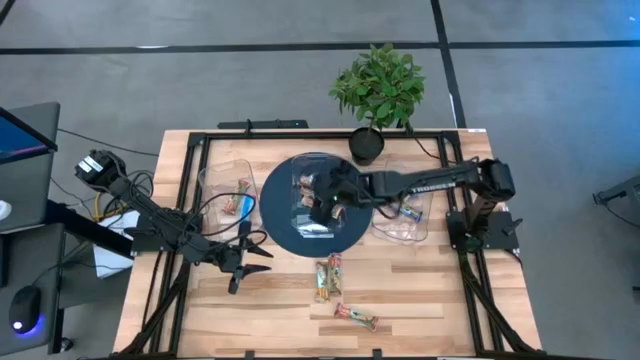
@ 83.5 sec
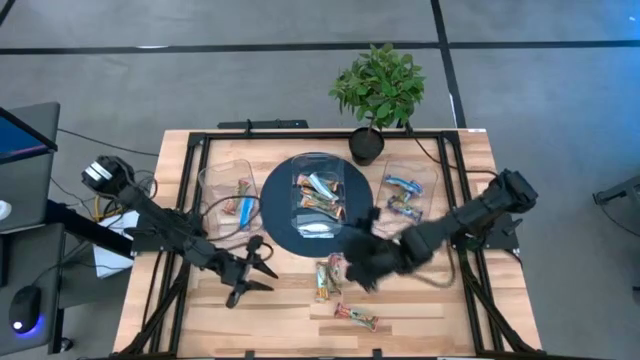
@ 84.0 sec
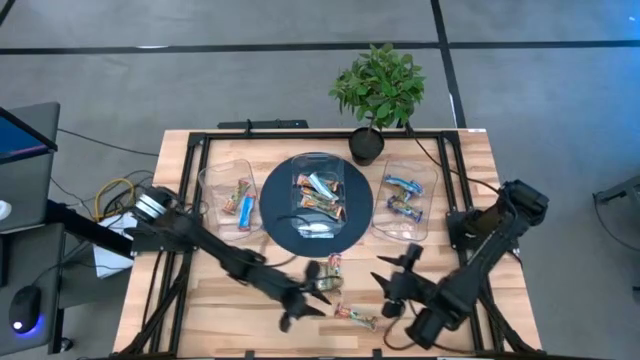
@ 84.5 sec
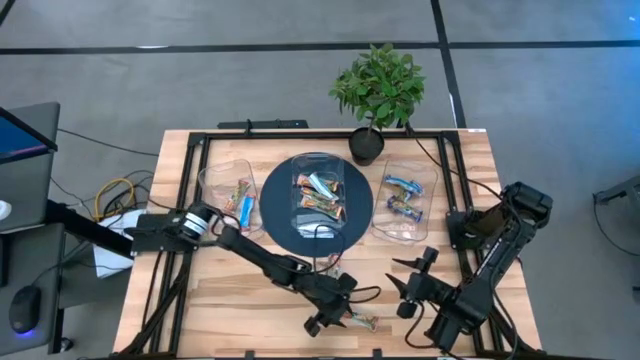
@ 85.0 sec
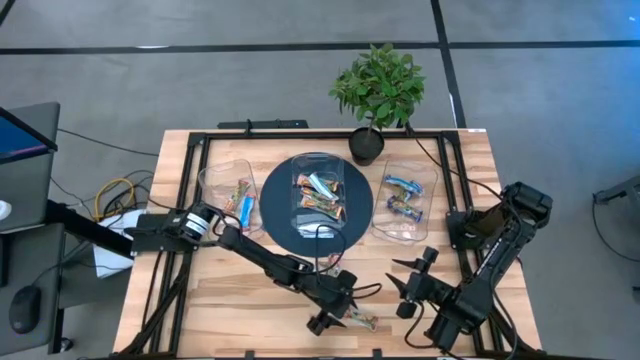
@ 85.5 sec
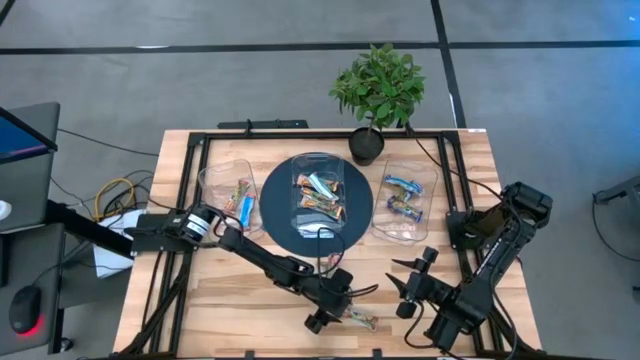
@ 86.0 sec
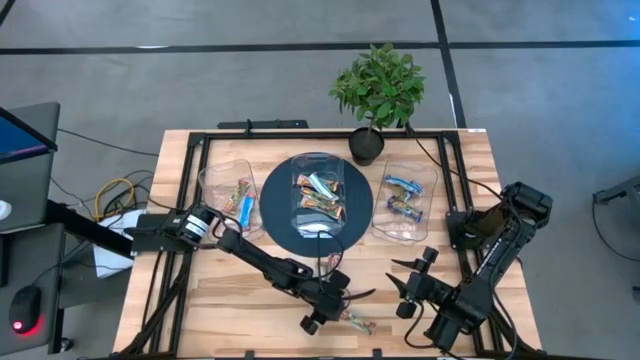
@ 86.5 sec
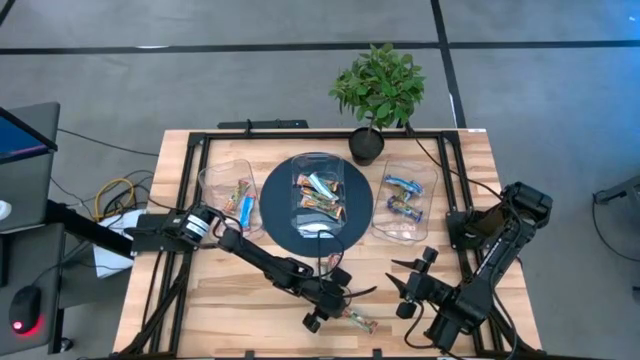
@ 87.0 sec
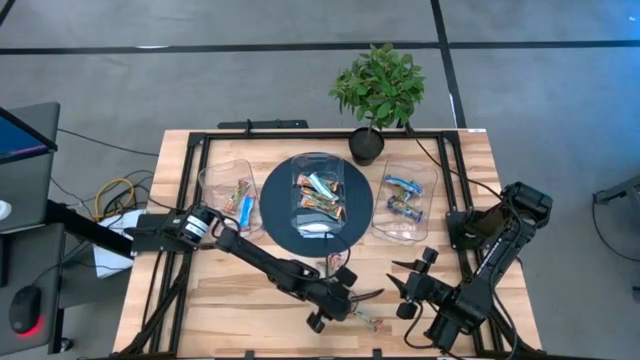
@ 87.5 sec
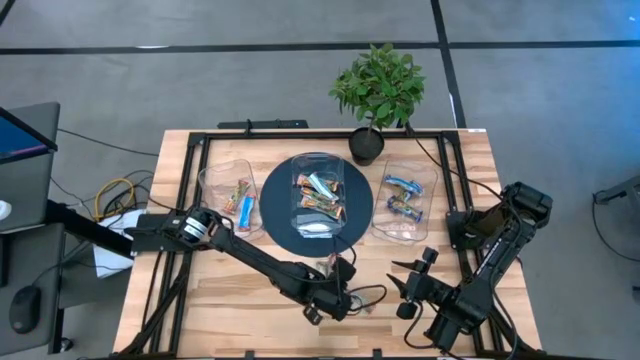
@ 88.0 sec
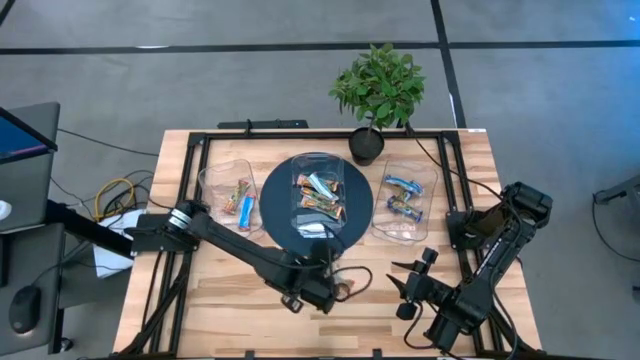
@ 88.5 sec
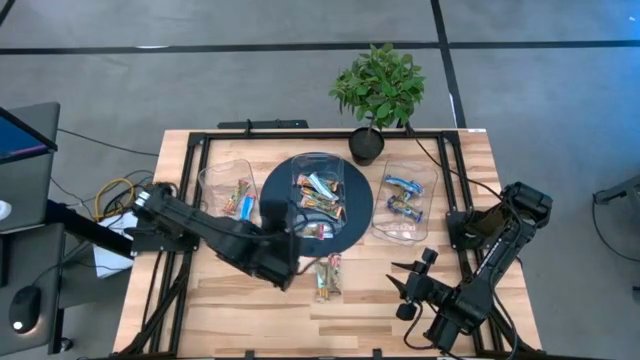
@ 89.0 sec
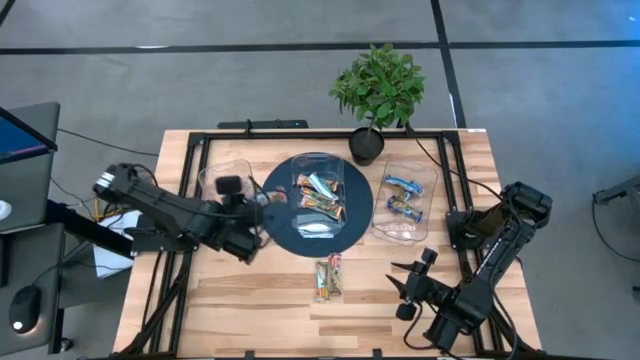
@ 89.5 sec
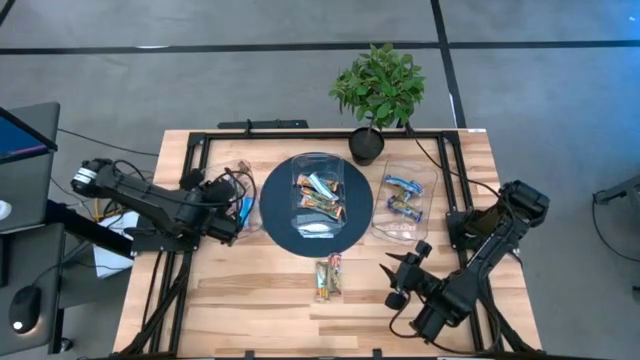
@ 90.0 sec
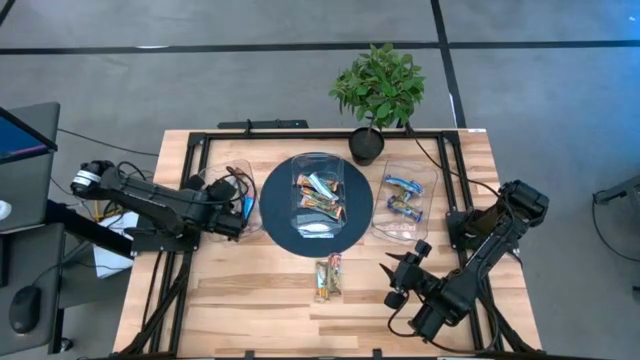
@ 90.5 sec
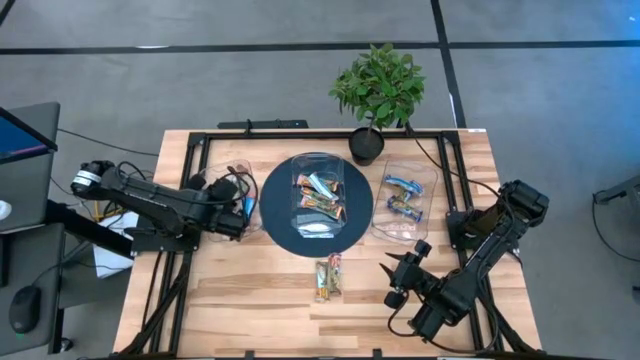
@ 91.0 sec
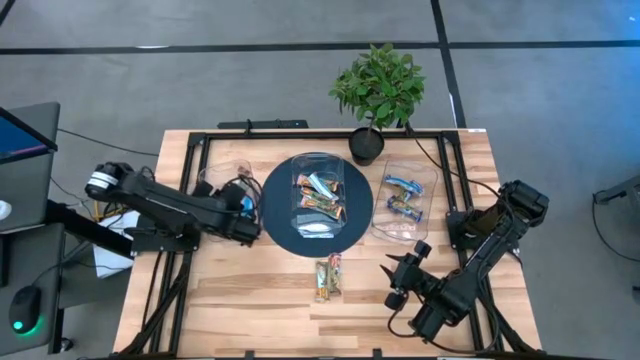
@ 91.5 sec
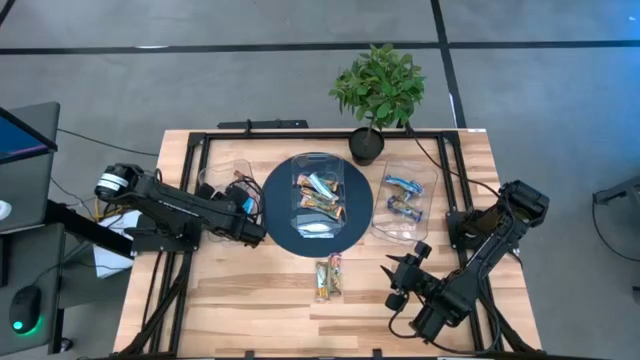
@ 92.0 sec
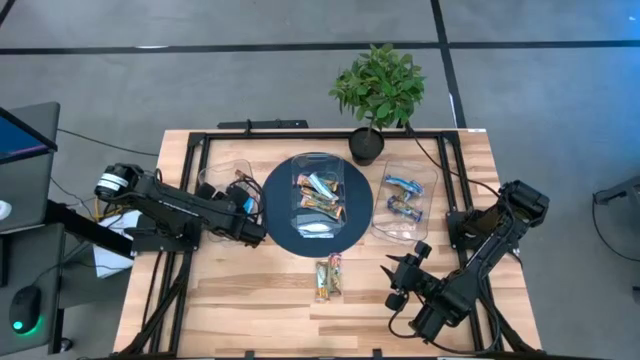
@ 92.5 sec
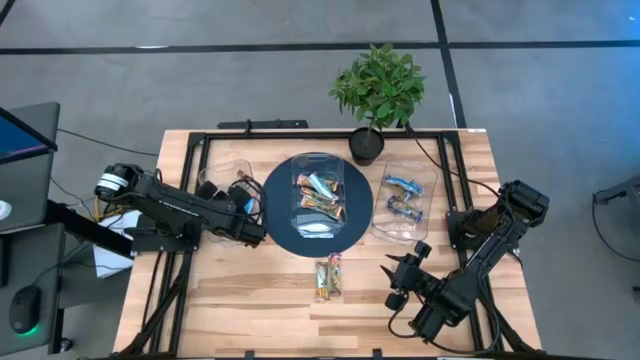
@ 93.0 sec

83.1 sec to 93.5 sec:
Task: Pick and place Granola Bars by type
Put the red granola bar into the left transparent bin

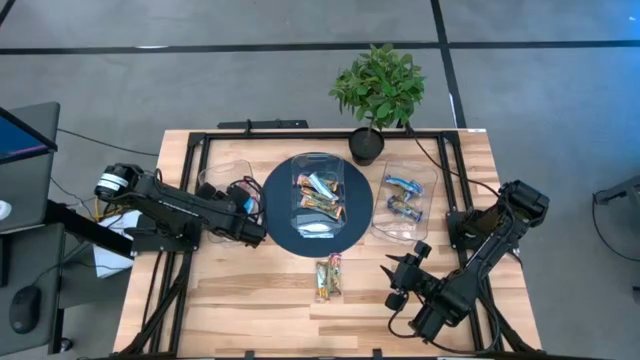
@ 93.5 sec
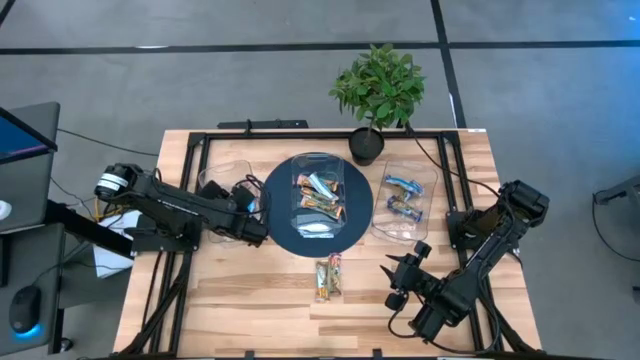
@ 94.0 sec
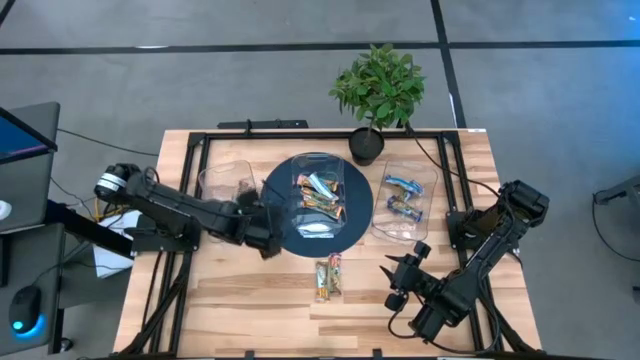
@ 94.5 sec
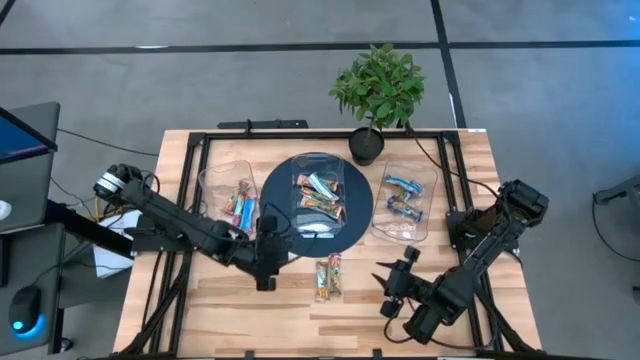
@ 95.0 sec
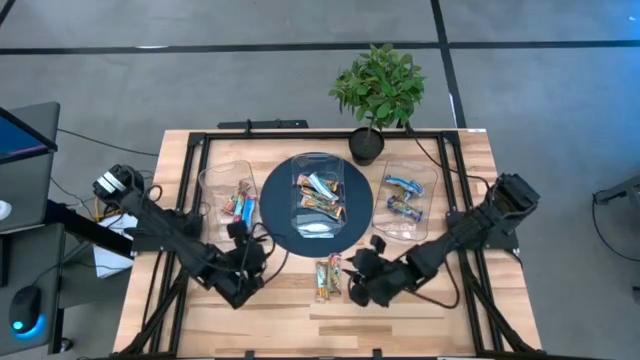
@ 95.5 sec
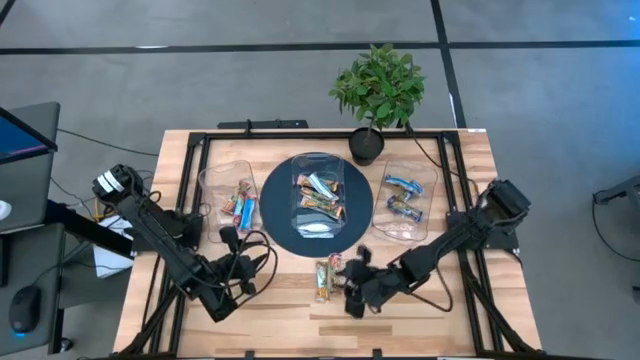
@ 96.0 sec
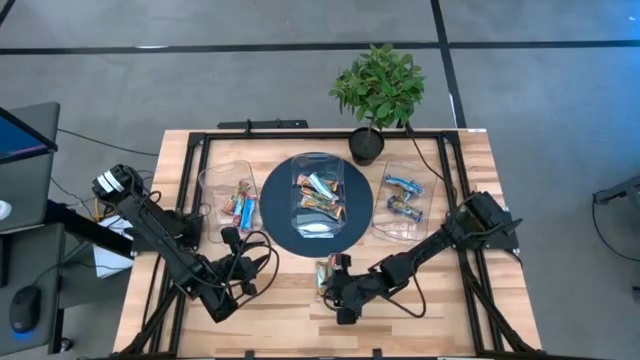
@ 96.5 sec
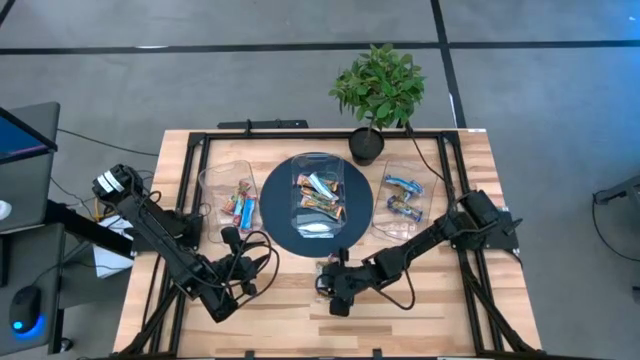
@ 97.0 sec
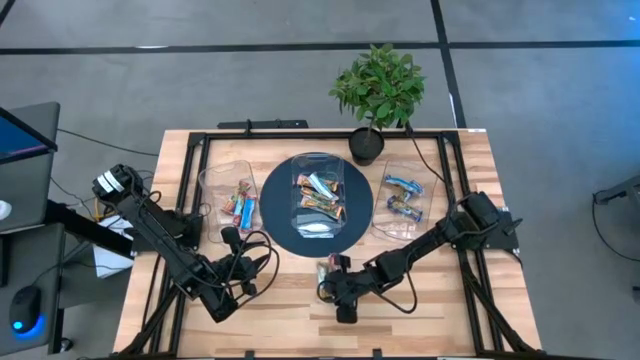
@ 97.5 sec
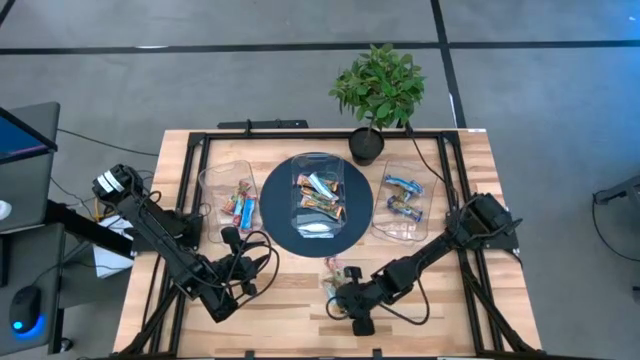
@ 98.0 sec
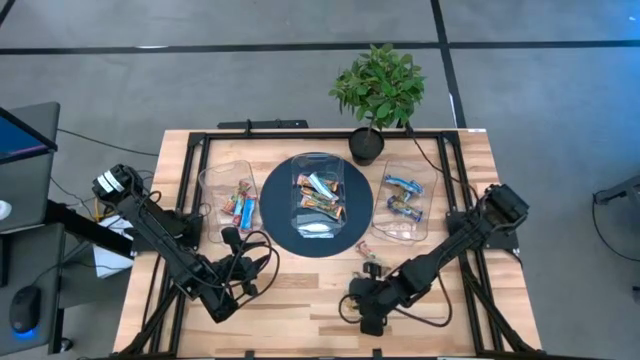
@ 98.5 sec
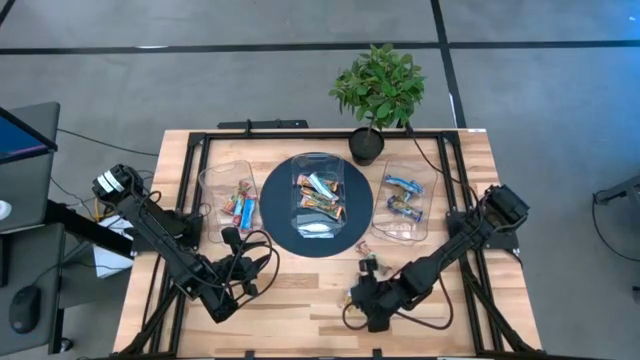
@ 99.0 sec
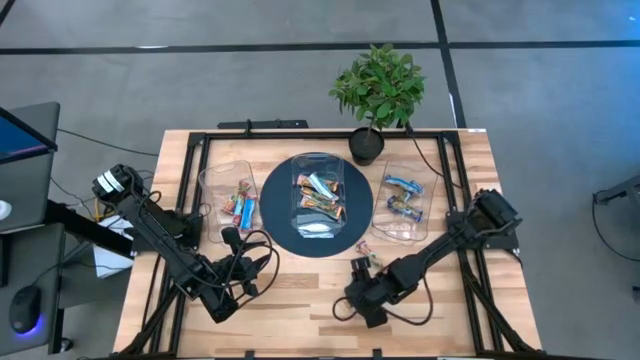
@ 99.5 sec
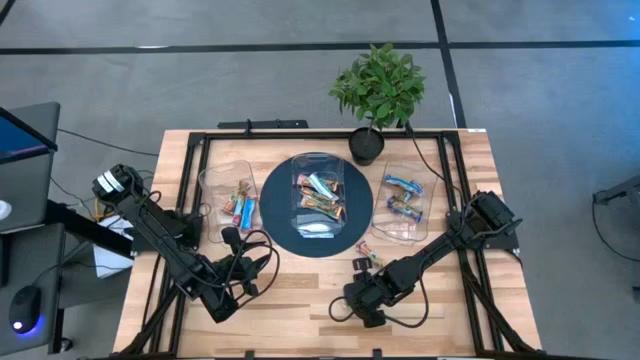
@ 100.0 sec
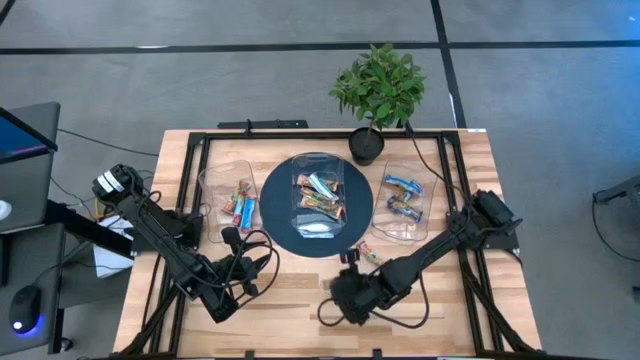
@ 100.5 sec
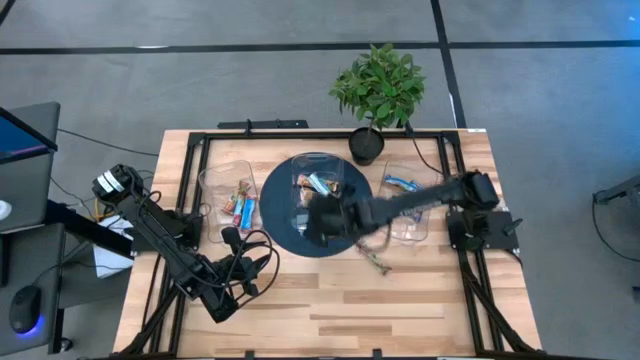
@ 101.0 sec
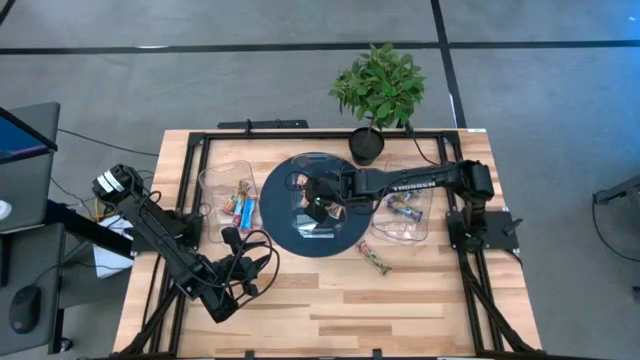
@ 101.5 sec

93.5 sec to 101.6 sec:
Put the yellow granola bar into the middle transparent bin

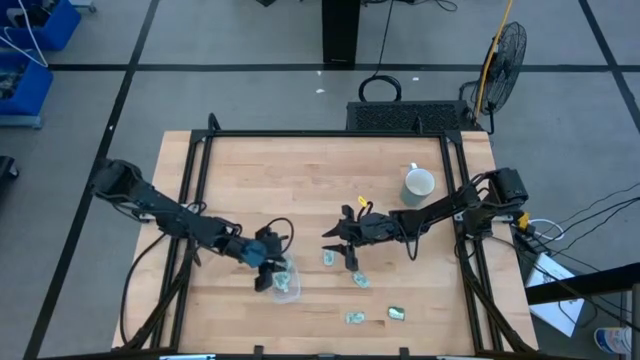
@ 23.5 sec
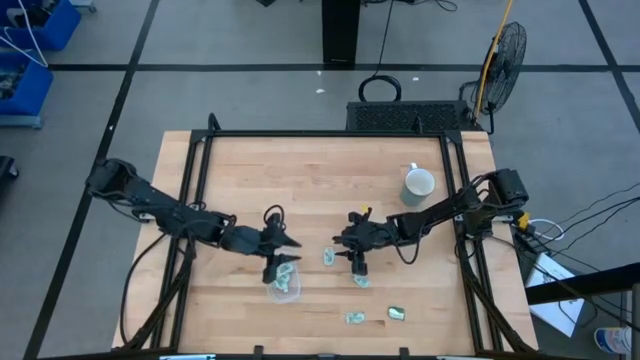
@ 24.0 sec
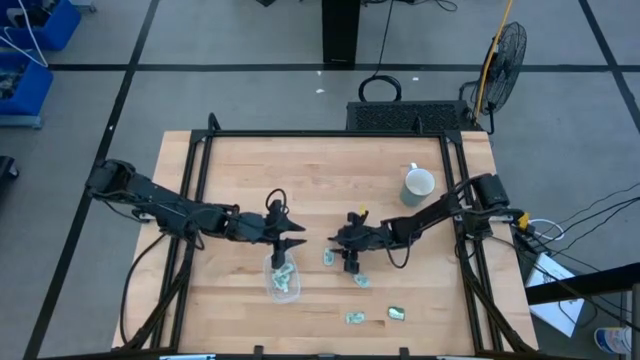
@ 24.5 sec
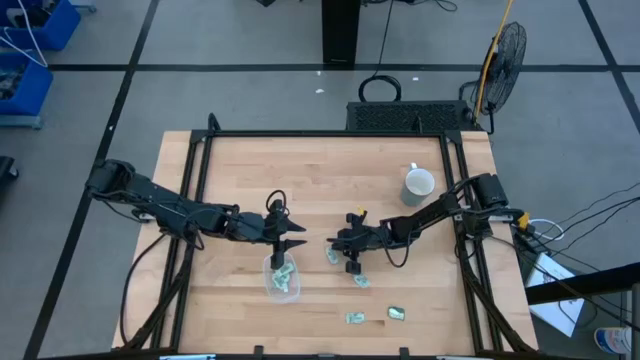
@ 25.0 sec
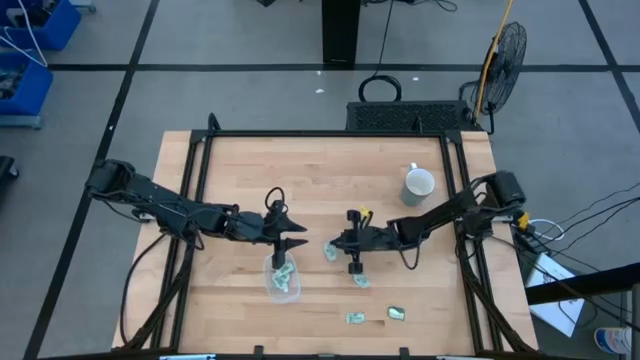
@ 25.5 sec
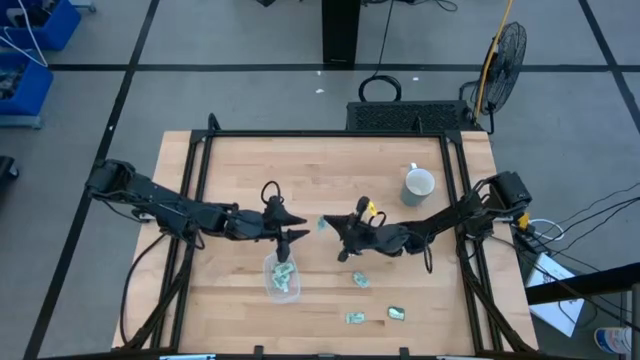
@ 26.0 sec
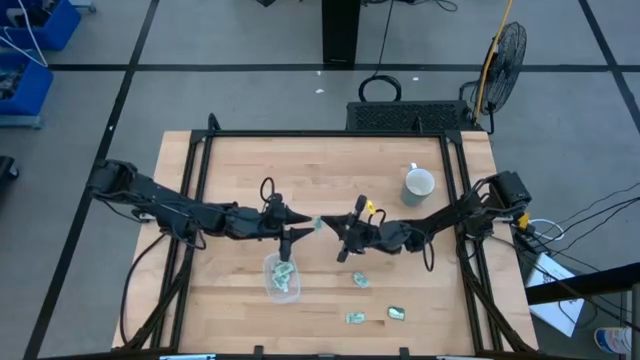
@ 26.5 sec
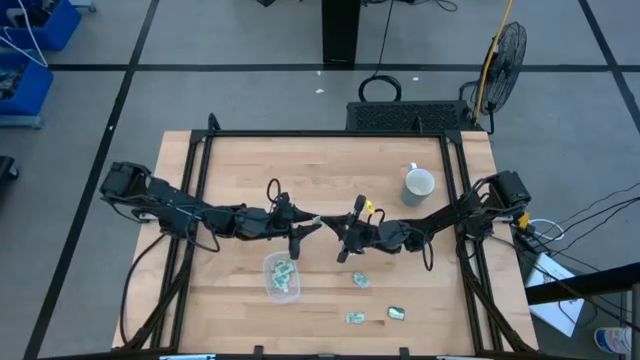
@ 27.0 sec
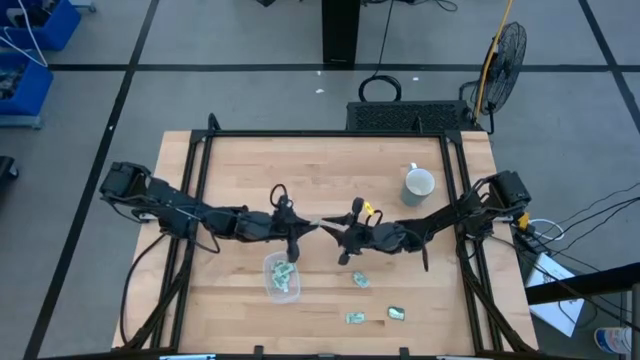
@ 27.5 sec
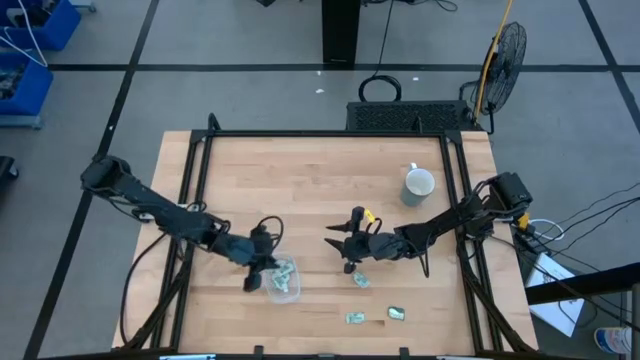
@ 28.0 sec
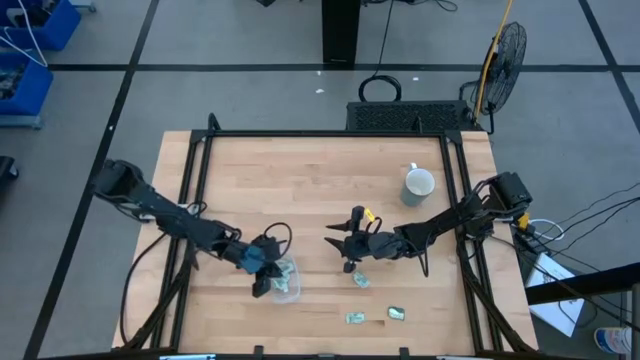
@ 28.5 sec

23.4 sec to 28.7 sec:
Task: Pick and place Stevia / Truvia into bins
Put the stevia packet into the transparent container
